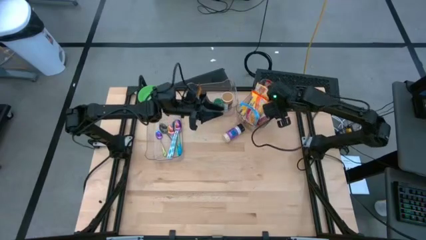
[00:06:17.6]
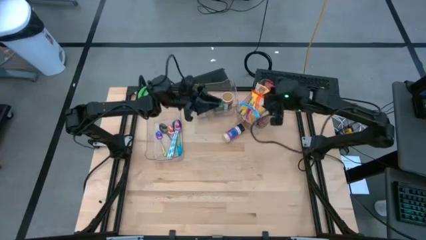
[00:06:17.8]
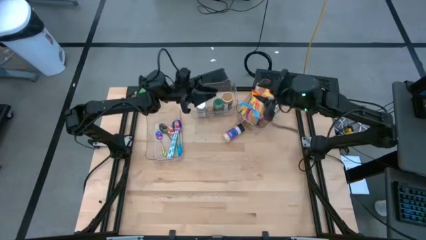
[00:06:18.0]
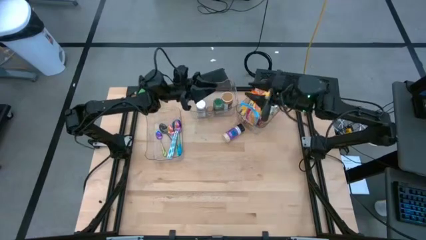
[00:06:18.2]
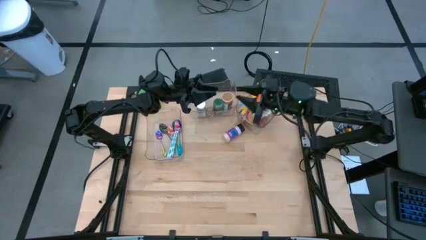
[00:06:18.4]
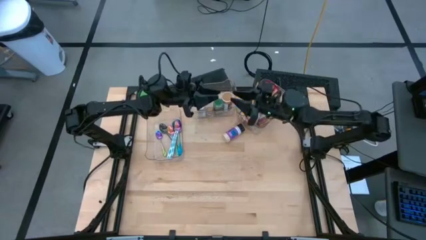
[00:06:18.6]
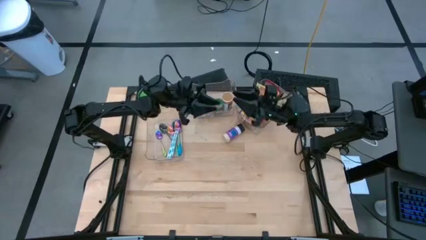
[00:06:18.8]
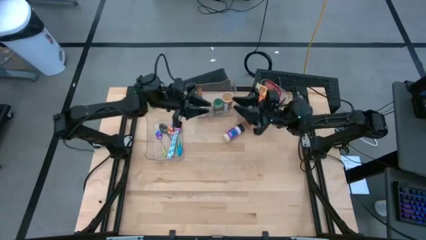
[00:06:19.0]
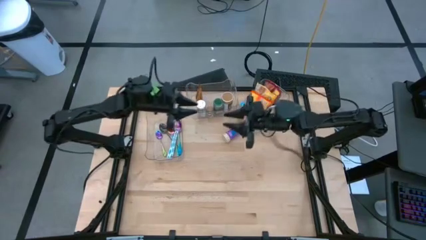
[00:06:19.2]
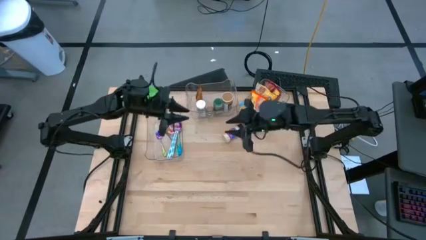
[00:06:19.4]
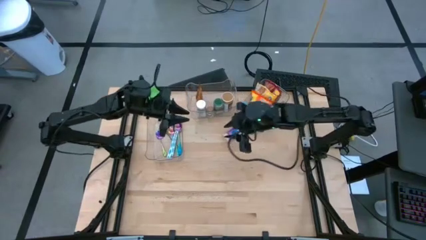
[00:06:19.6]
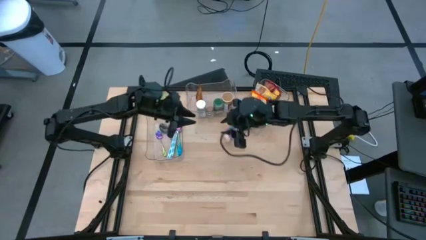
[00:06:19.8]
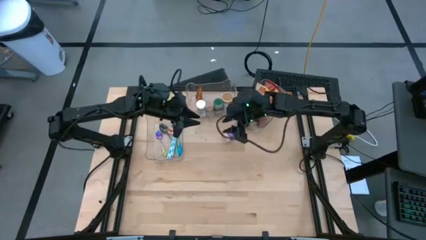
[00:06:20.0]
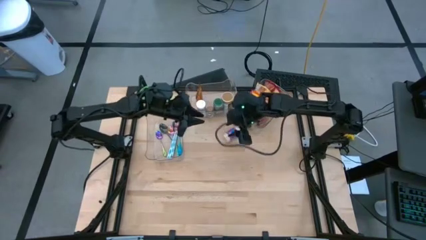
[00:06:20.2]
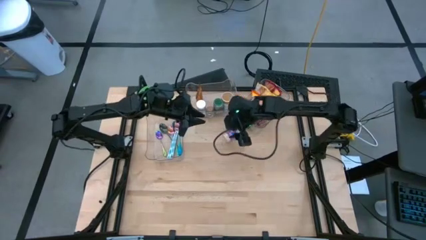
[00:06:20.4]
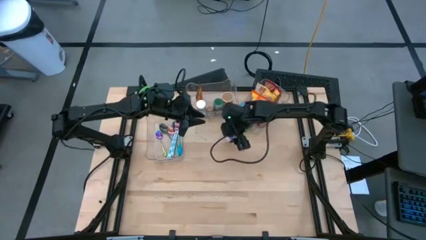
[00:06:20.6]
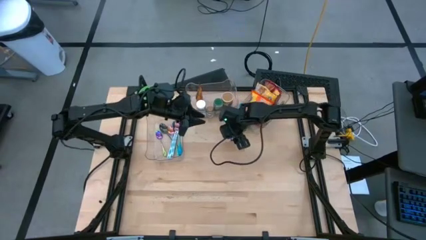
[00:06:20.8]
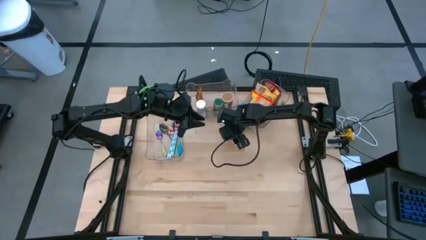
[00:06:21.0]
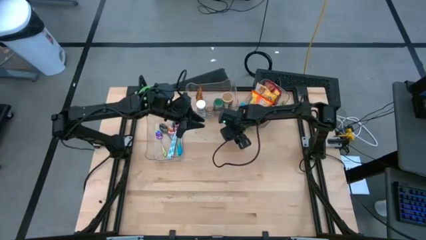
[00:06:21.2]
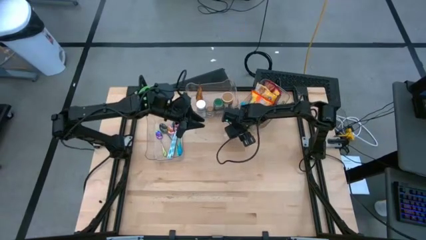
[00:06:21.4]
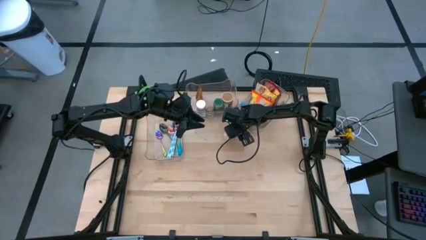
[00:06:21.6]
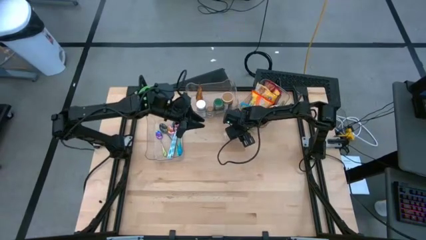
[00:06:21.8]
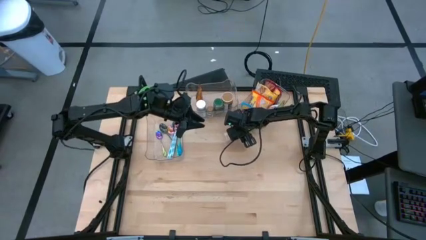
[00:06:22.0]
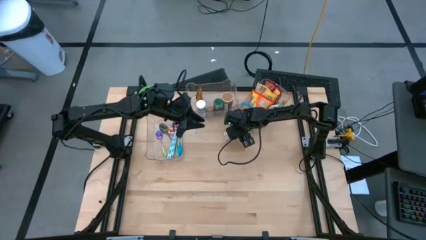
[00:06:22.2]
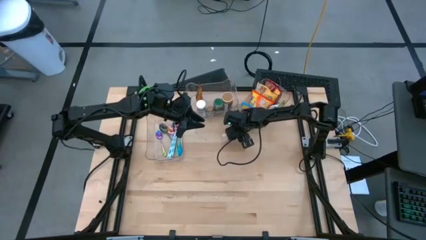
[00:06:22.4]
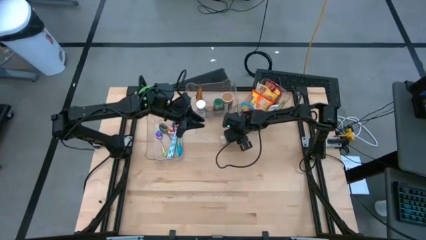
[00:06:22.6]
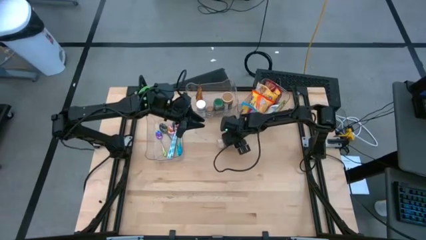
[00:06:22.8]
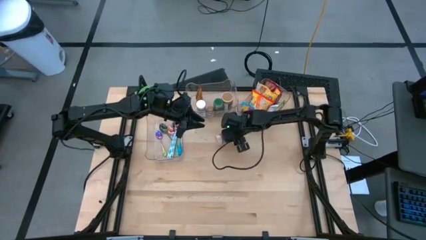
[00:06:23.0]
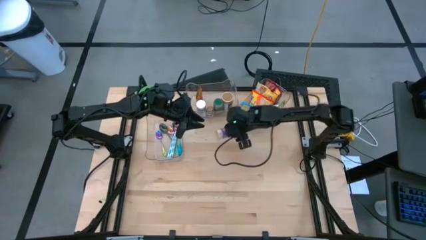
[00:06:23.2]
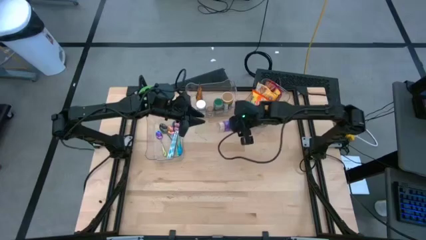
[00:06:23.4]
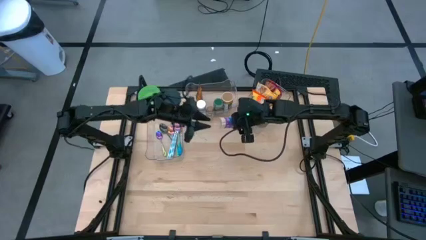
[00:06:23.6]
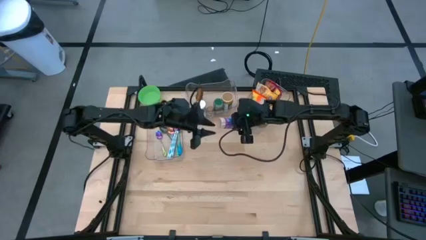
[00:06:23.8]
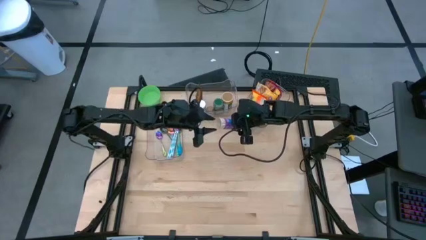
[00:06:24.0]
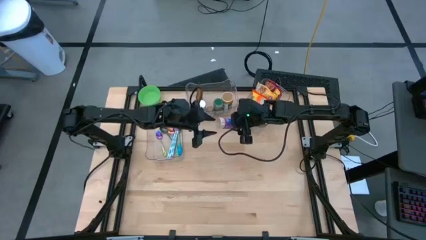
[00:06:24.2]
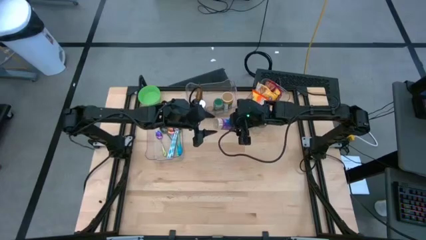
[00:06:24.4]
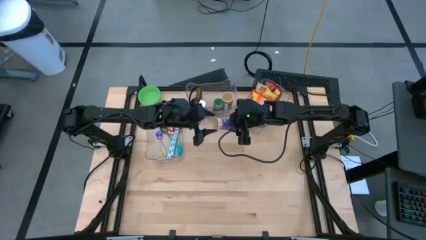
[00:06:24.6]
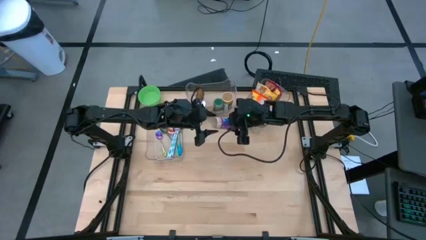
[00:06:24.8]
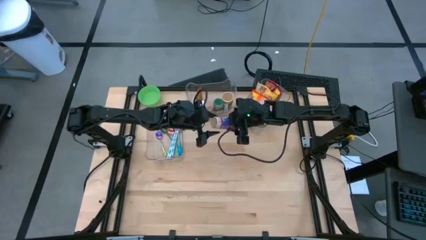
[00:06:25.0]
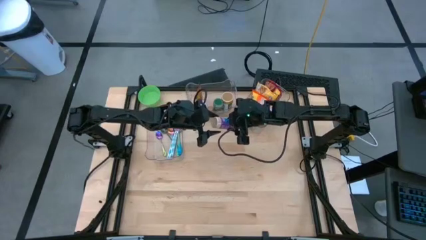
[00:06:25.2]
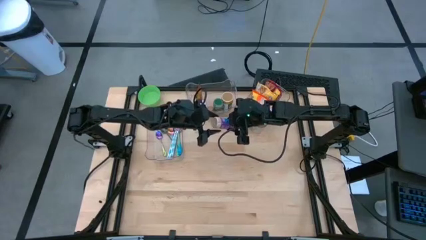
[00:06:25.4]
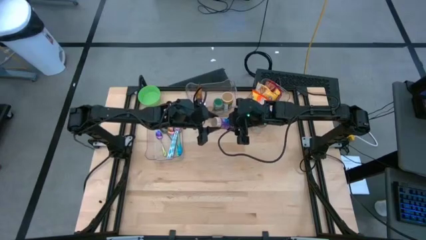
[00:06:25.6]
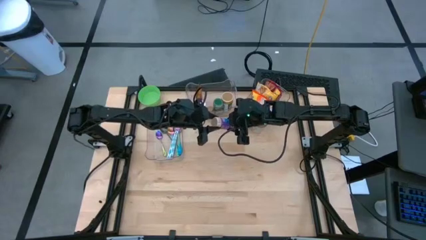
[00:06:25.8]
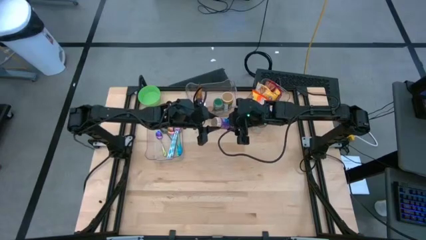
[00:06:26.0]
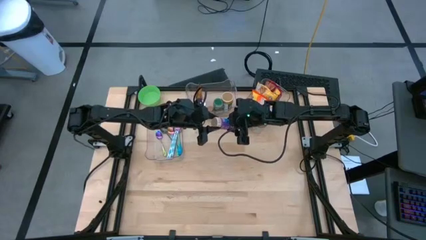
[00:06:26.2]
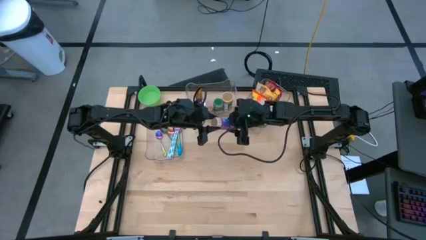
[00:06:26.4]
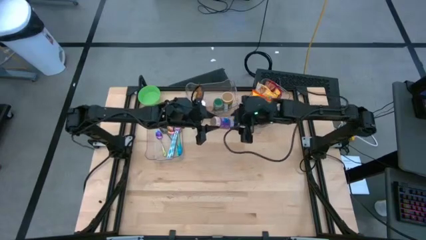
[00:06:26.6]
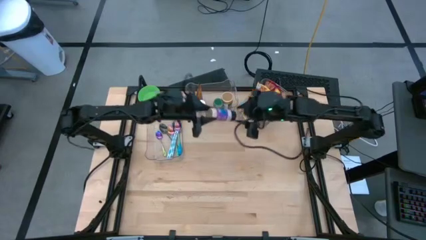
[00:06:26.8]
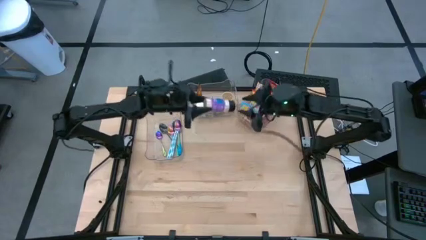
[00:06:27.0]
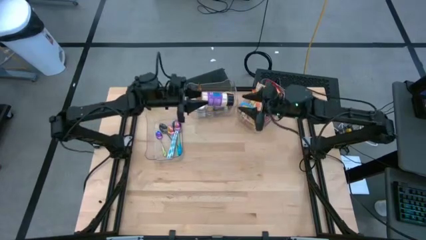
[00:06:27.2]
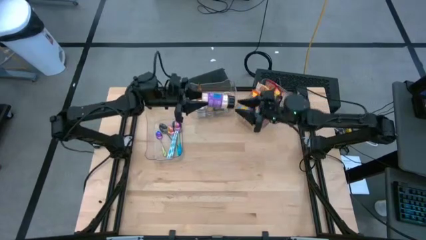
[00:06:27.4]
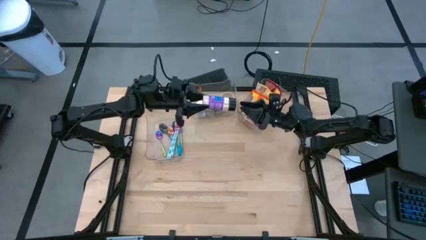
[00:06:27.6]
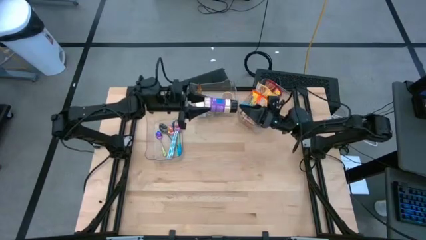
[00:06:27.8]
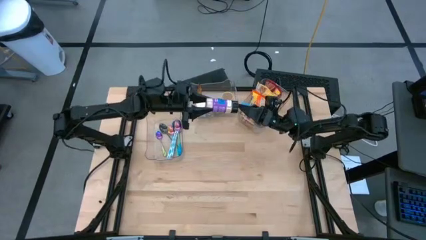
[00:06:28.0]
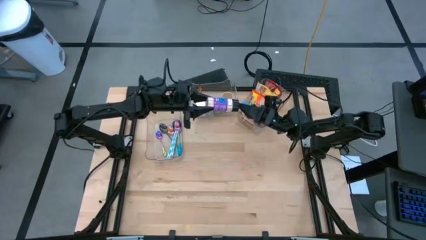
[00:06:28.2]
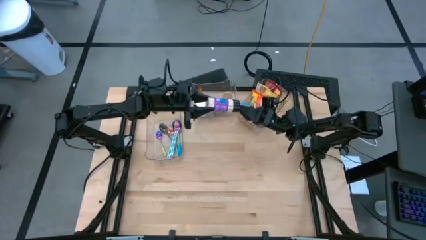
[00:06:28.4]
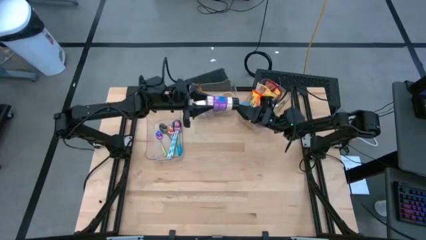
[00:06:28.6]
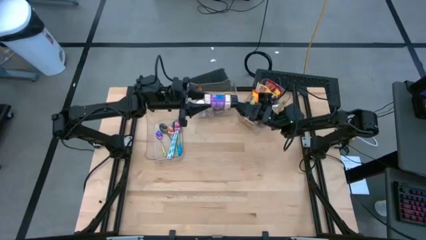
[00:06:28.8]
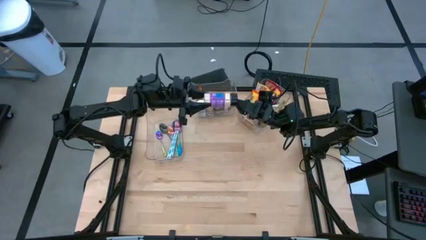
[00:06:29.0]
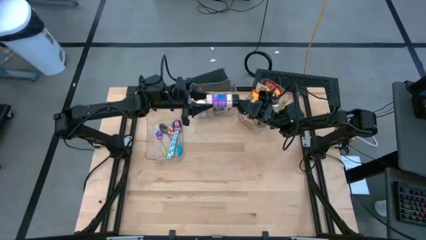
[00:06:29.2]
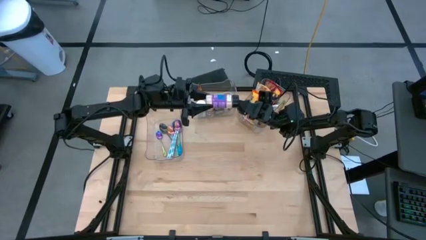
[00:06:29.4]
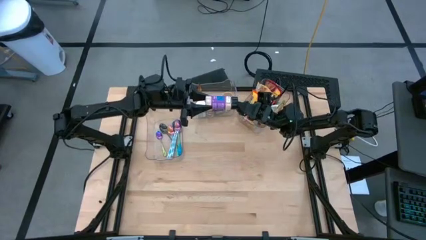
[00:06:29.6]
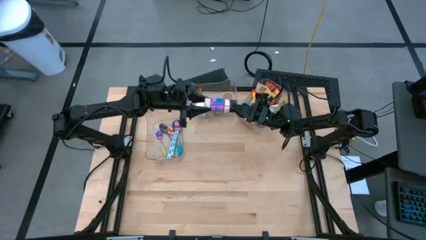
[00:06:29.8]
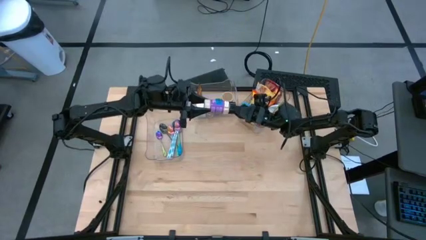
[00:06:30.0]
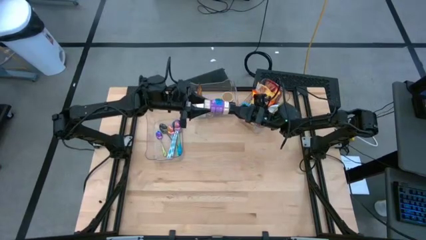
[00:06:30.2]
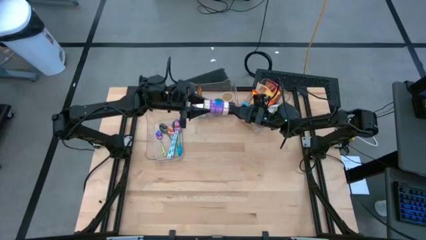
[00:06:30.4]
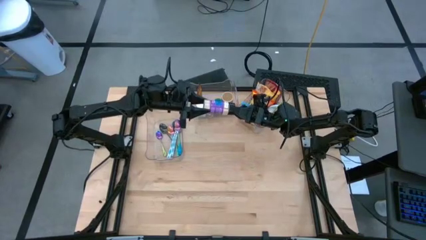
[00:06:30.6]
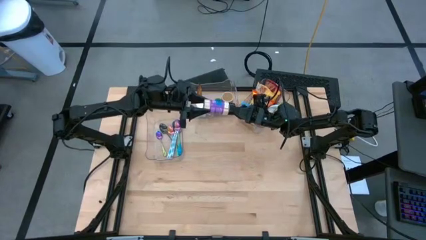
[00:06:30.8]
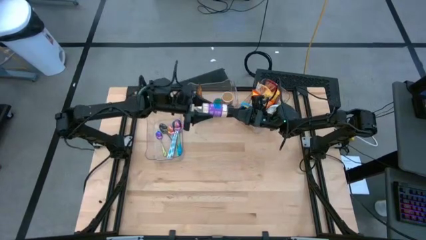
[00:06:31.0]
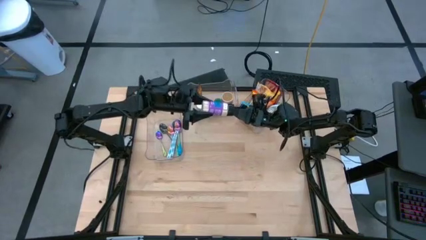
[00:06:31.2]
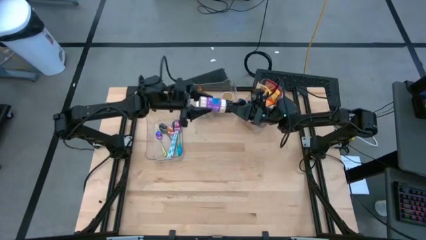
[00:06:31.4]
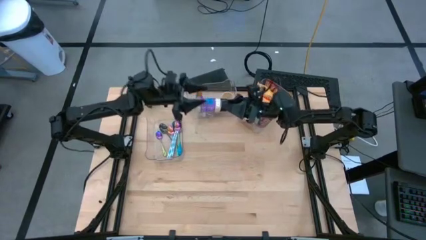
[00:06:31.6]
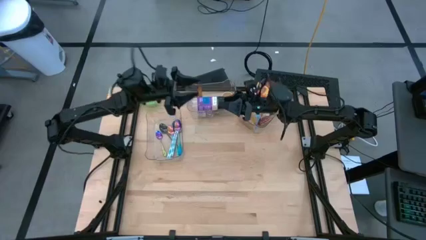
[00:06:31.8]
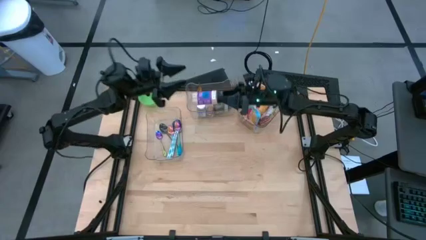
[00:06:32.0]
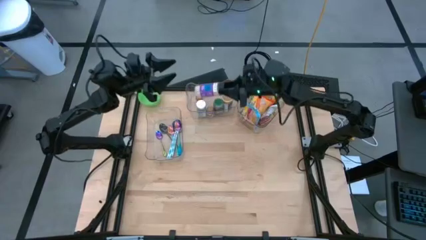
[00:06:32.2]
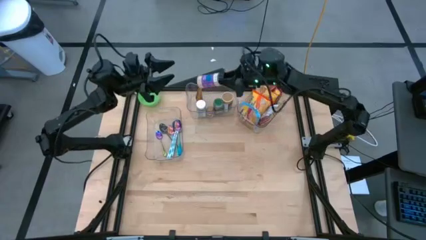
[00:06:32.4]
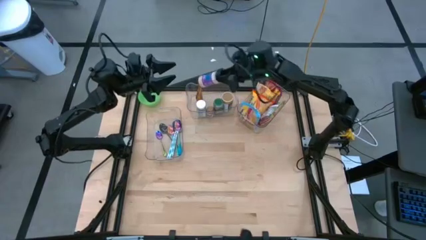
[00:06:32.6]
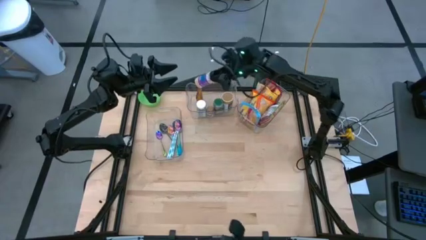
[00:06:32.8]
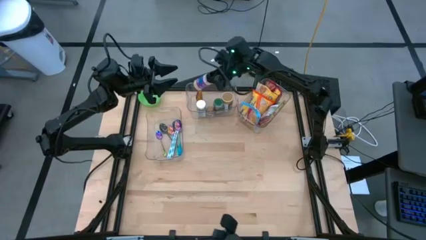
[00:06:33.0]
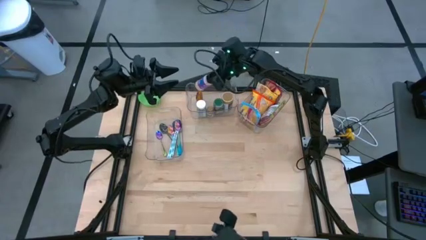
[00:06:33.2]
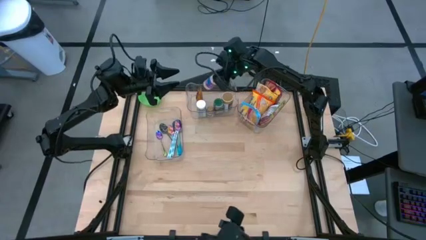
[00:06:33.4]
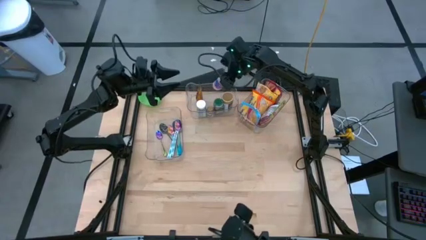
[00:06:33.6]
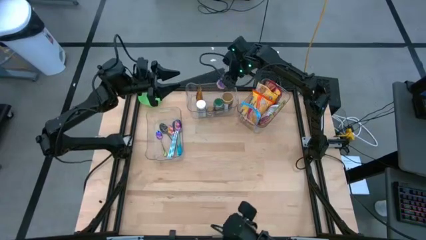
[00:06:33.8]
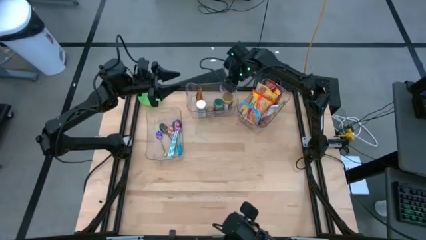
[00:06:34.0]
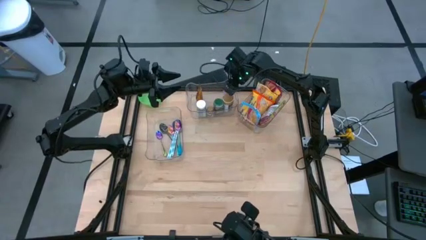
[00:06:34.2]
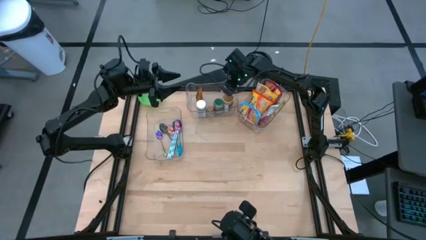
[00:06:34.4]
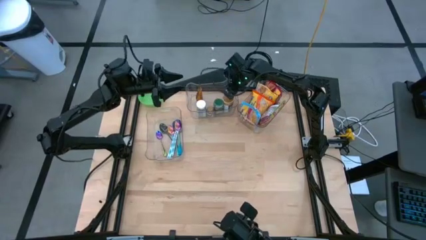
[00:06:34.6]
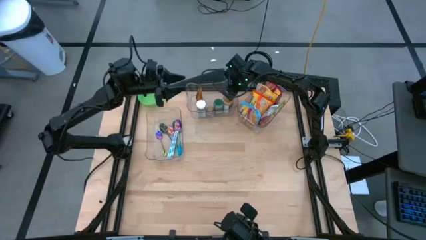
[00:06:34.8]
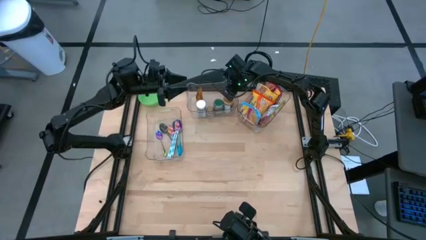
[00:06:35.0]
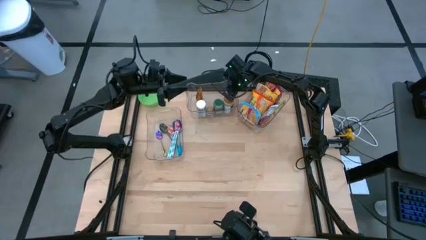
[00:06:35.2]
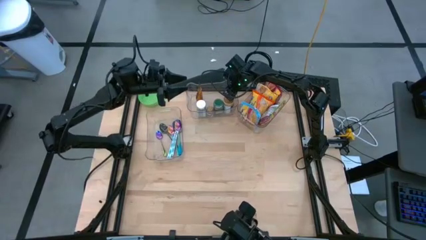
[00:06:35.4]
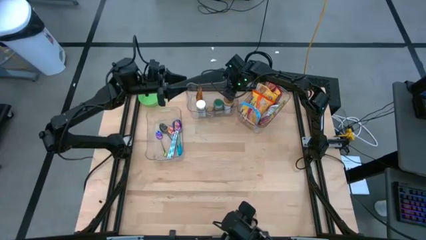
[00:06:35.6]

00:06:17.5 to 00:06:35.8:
Task: Pick & Place Food Item
Put the violet spice bottle into the middle transparent bin
